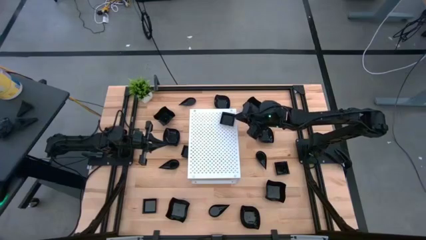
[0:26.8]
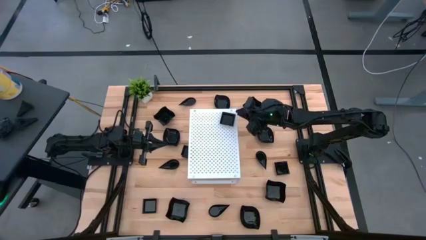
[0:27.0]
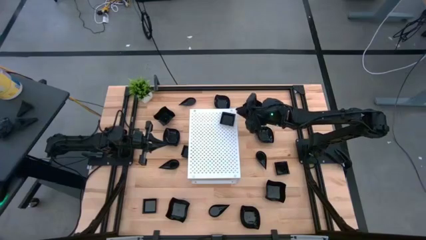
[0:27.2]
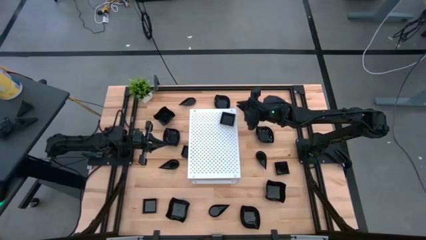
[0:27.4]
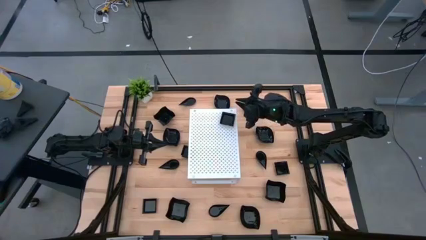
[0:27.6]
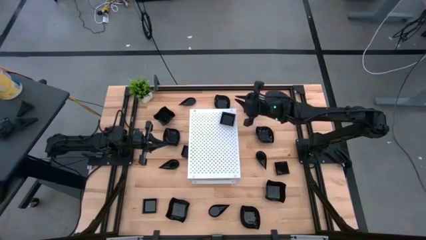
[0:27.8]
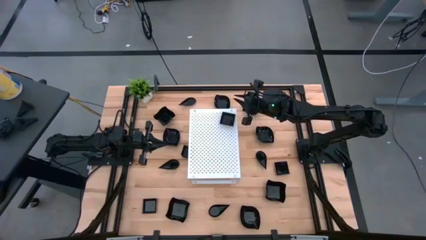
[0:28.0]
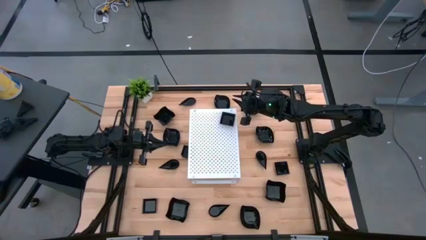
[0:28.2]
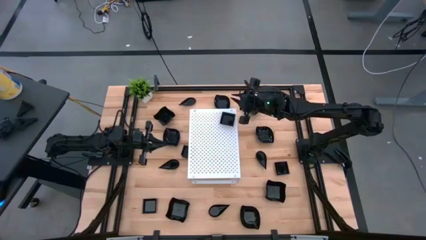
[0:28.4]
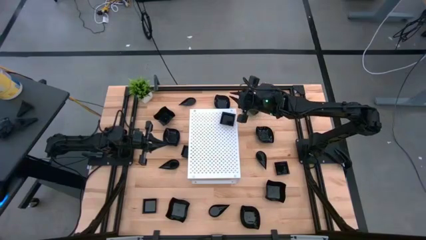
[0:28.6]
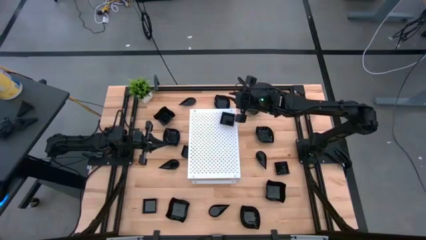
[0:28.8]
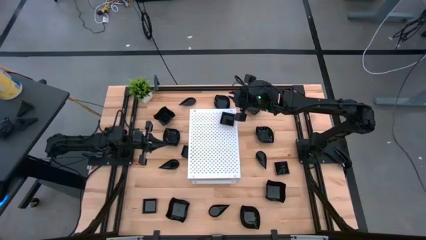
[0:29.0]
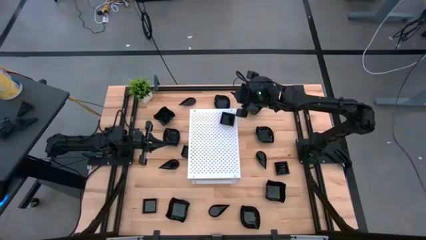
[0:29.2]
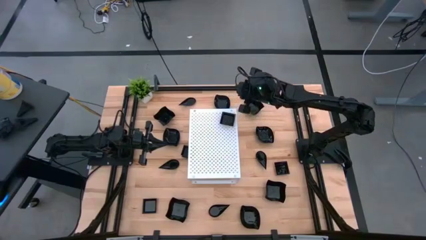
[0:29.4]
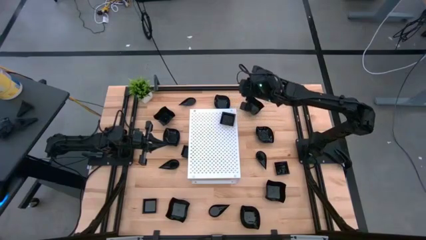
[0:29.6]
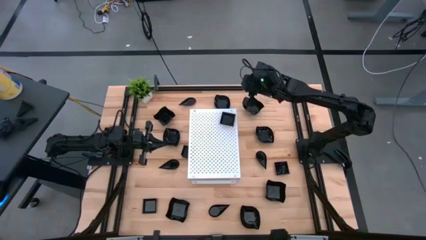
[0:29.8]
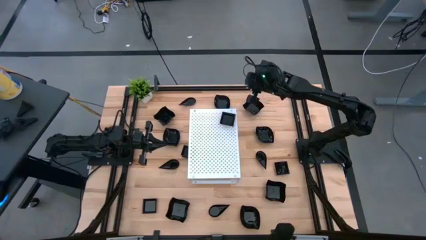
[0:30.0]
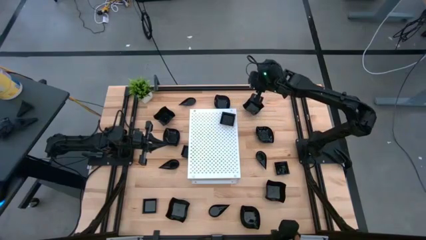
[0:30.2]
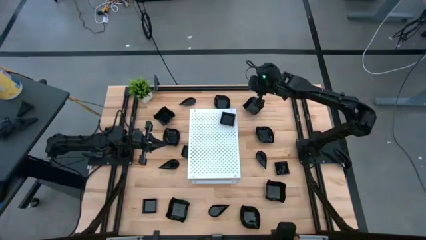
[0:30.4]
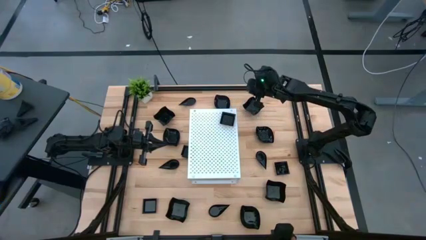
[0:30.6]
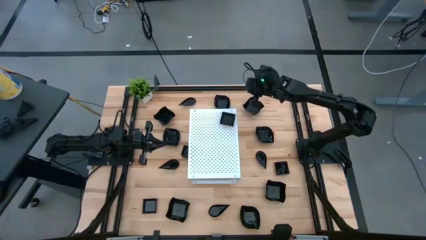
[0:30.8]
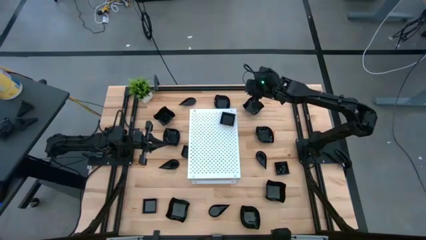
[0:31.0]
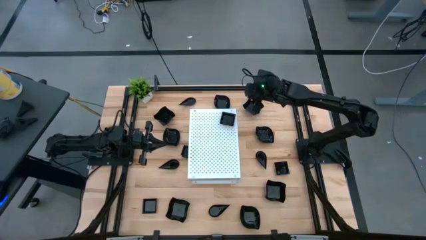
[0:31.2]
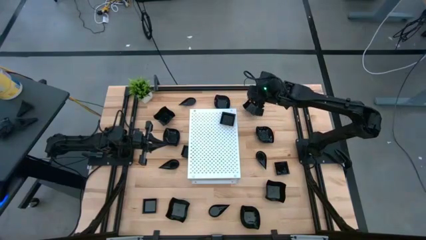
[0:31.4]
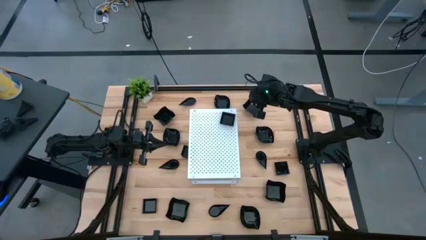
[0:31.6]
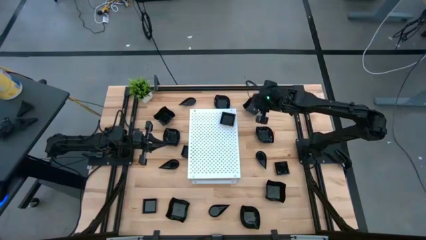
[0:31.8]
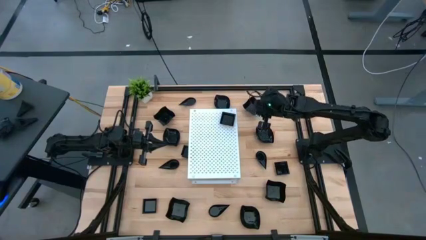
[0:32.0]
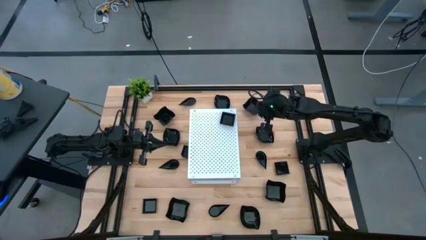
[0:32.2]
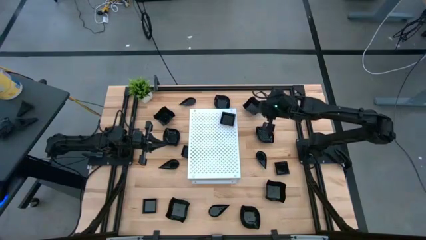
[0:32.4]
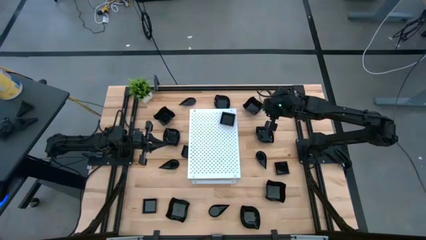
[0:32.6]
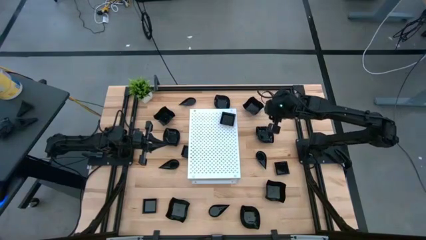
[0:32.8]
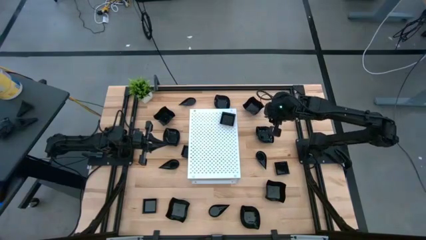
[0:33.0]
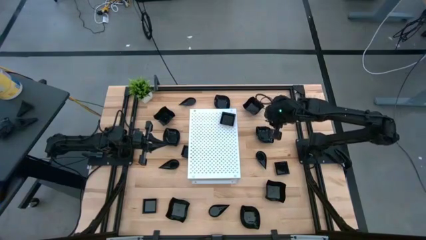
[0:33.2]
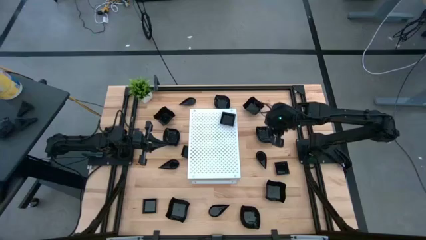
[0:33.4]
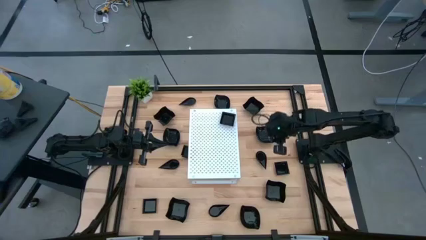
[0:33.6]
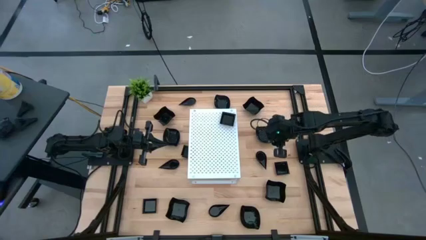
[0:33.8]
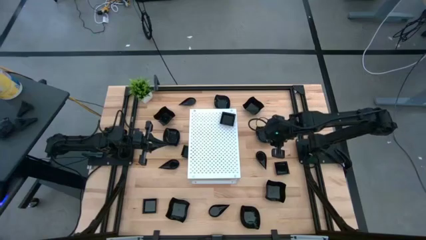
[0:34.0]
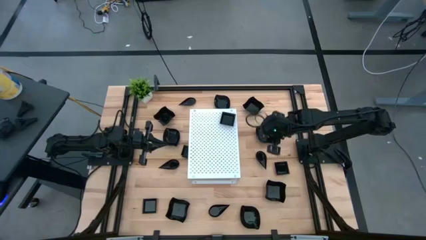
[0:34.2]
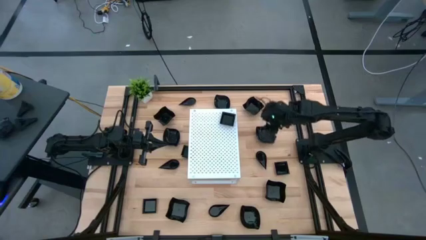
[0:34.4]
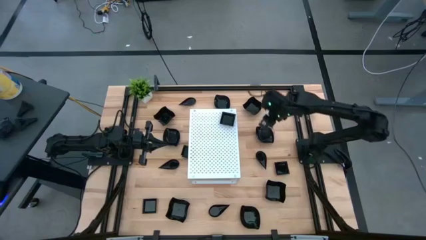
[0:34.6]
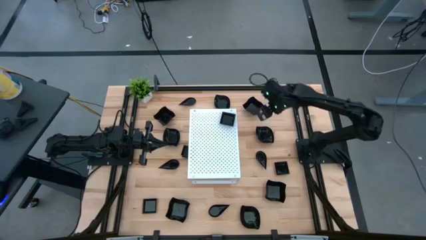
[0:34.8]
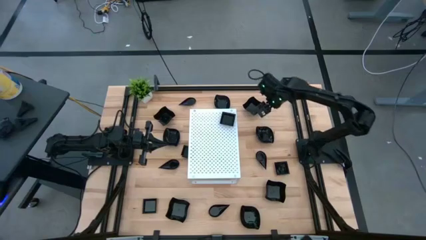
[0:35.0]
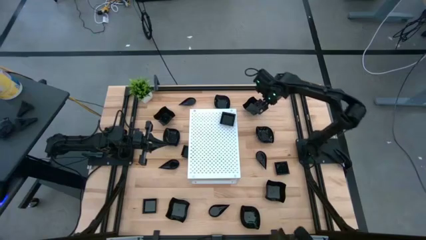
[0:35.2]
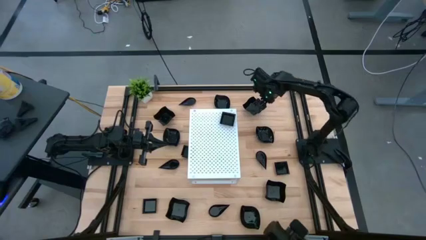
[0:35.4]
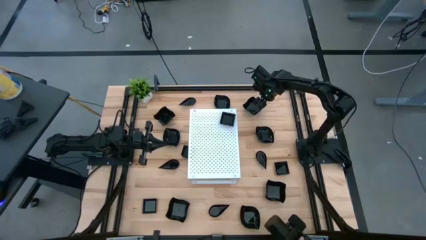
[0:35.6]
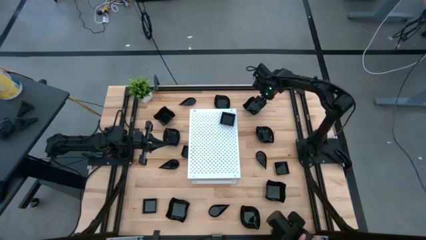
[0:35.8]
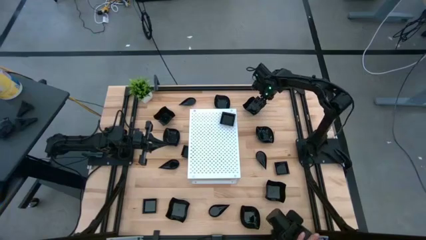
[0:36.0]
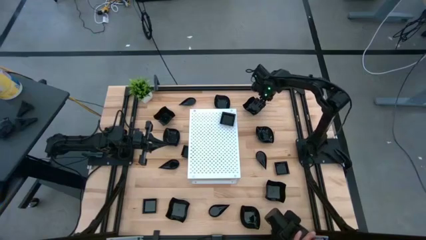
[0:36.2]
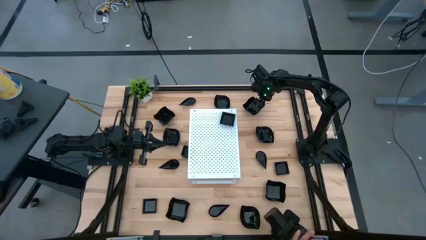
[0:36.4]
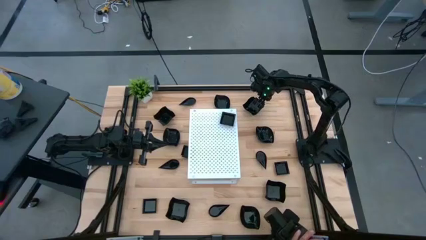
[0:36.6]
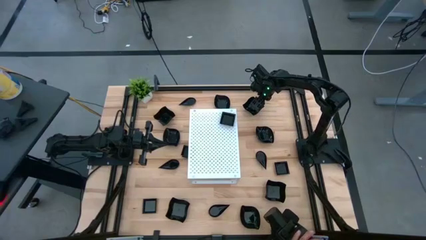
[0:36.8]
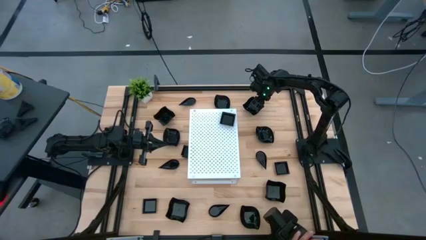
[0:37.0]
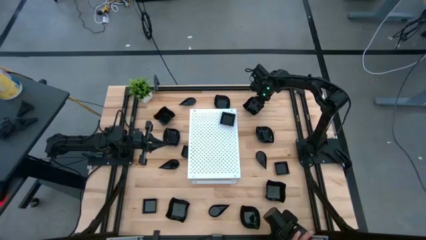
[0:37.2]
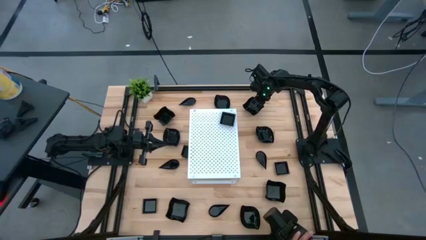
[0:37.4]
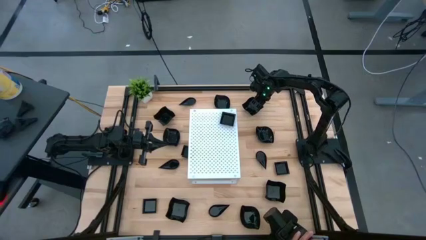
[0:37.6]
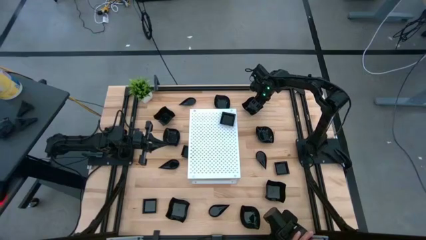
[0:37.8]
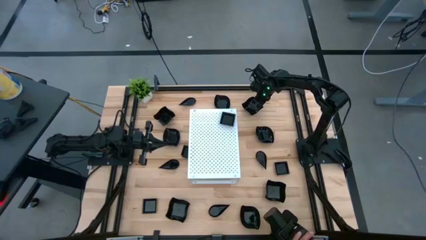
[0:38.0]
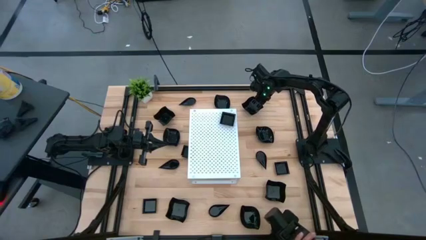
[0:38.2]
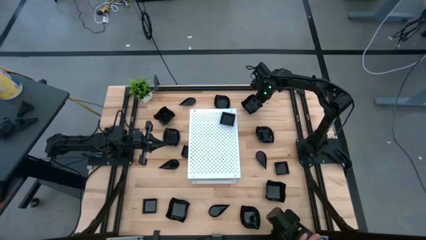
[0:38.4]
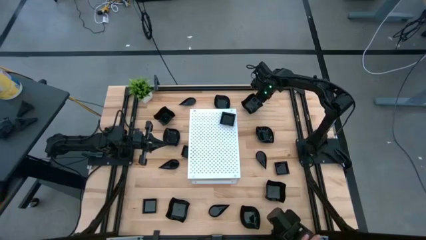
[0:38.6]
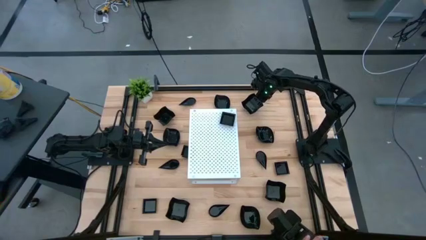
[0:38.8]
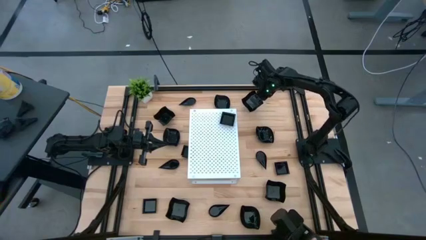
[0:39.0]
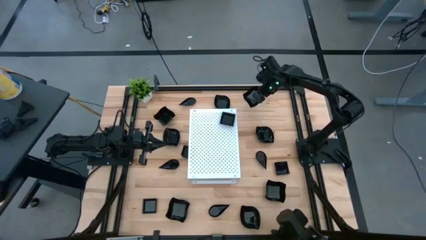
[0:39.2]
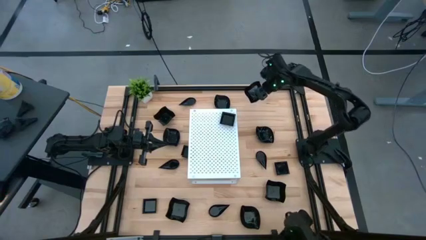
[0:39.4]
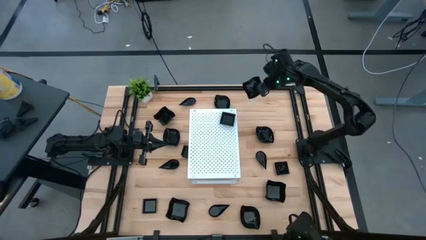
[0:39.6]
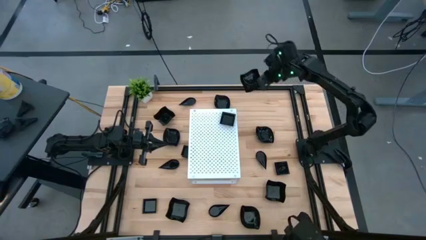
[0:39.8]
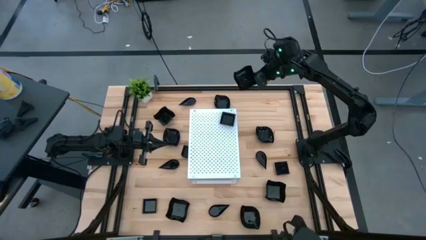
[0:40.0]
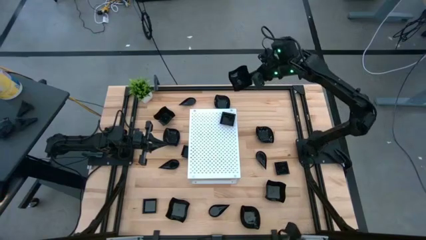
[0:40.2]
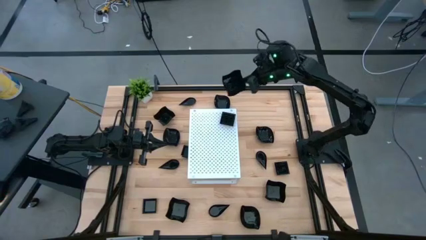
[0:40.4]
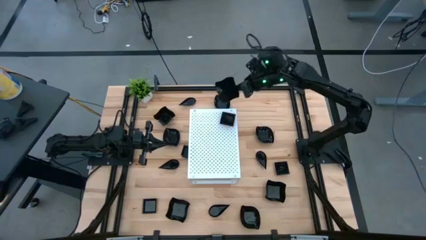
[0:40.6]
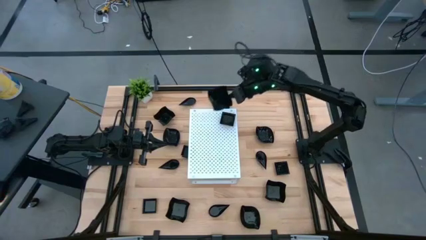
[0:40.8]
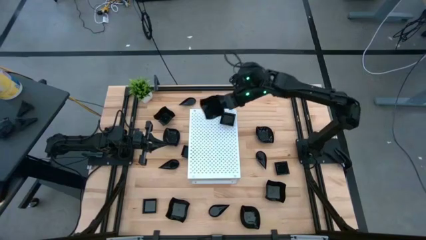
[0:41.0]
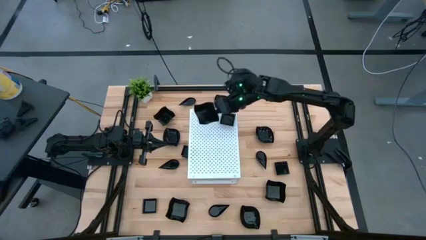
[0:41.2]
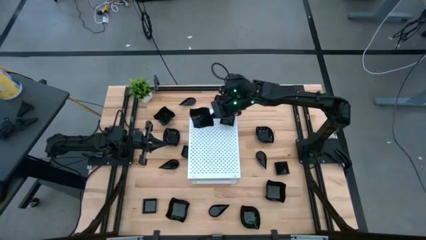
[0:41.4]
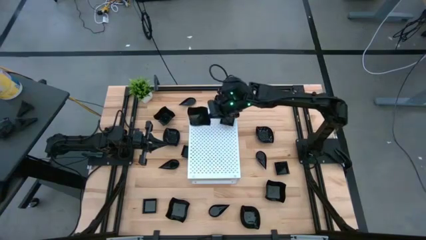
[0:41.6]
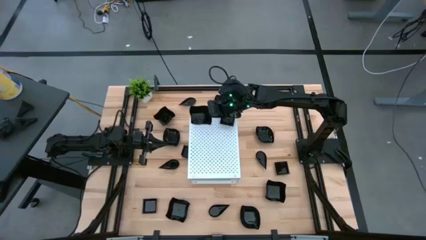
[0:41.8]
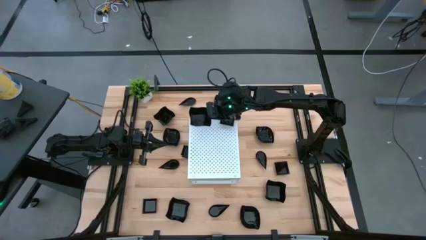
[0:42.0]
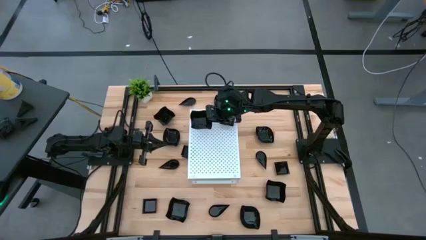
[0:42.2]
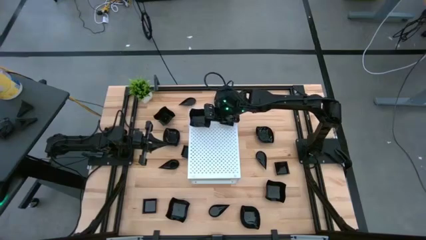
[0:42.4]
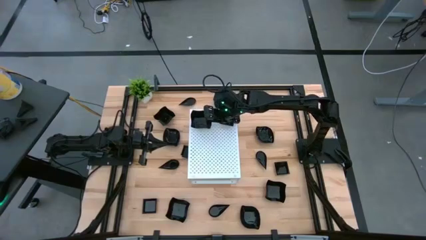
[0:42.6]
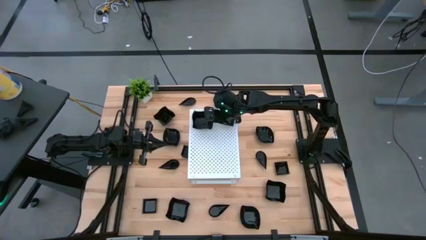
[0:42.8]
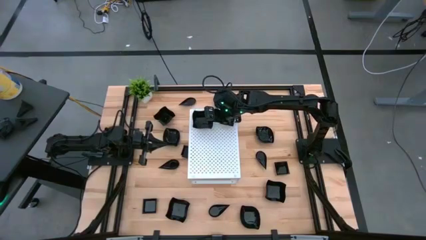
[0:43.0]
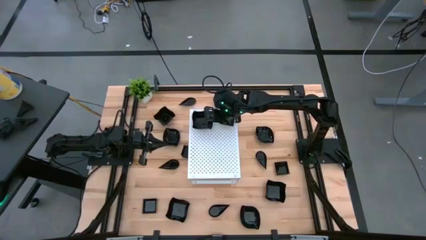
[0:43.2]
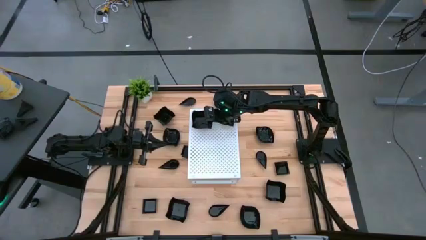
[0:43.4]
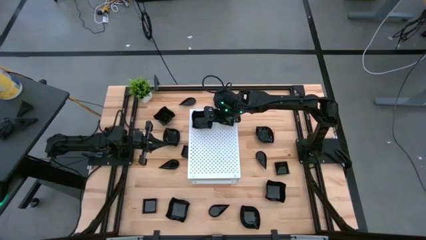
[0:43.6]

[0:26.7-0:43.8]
Task: Pick & Place Mini shaped plates
Put the black distorted square plate on the shelf
